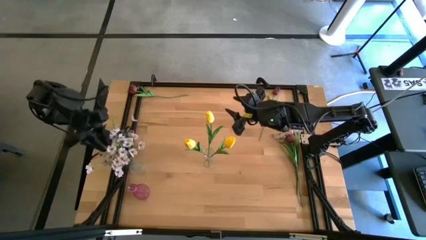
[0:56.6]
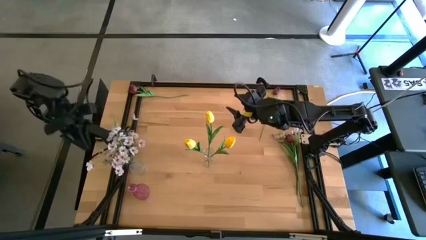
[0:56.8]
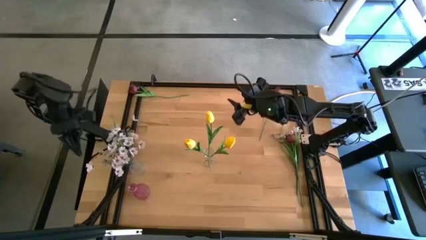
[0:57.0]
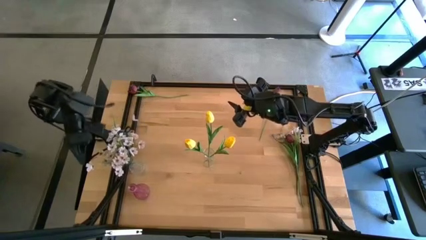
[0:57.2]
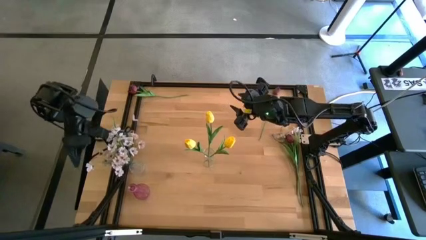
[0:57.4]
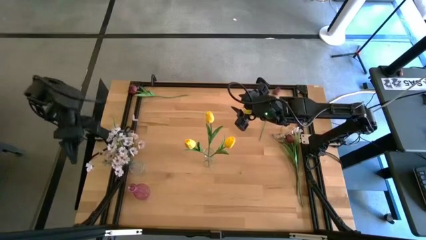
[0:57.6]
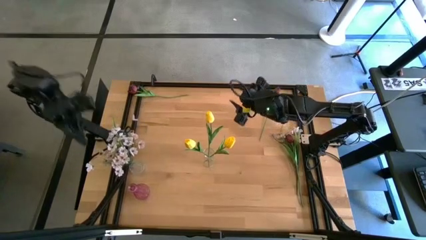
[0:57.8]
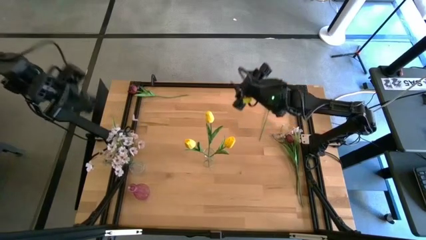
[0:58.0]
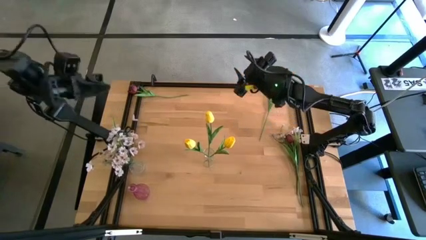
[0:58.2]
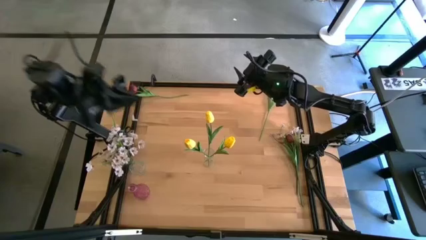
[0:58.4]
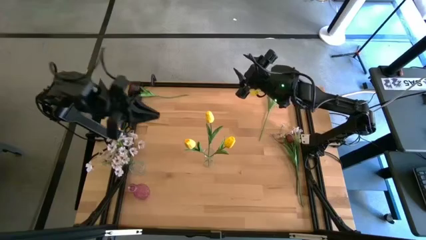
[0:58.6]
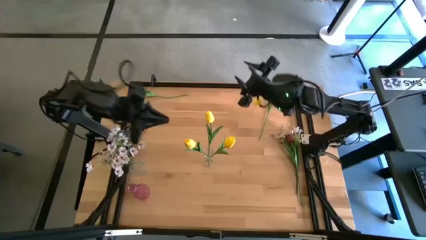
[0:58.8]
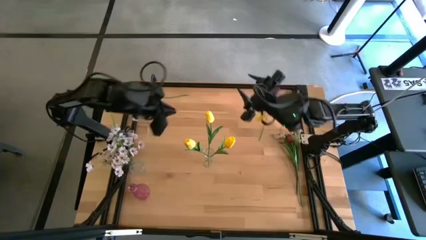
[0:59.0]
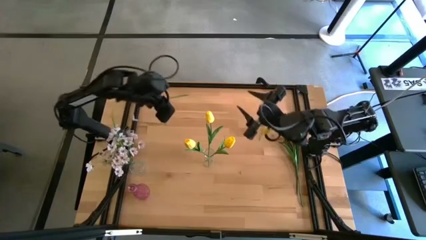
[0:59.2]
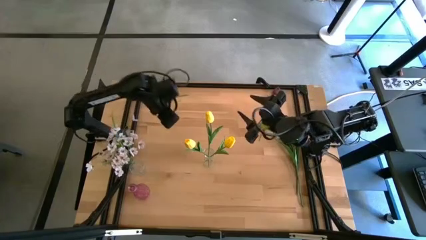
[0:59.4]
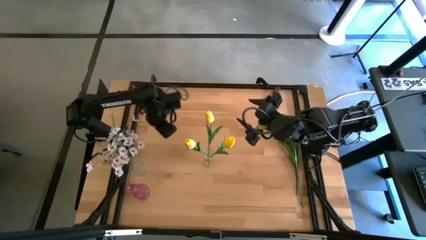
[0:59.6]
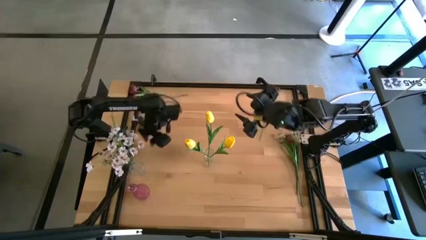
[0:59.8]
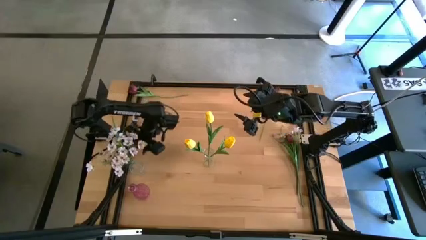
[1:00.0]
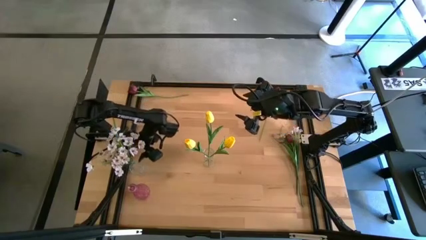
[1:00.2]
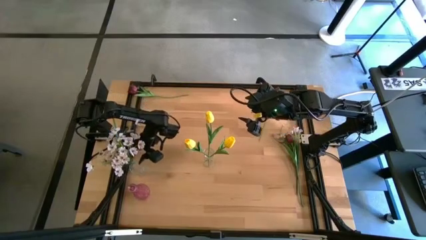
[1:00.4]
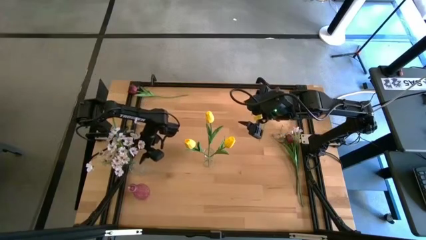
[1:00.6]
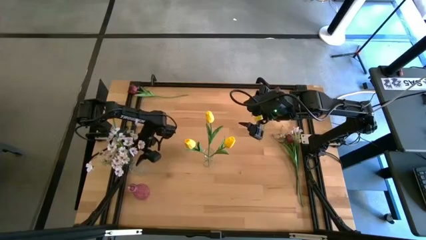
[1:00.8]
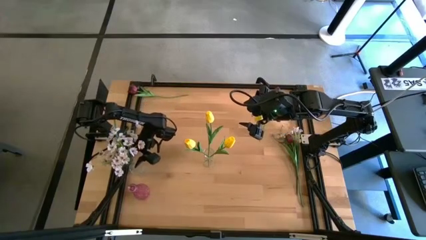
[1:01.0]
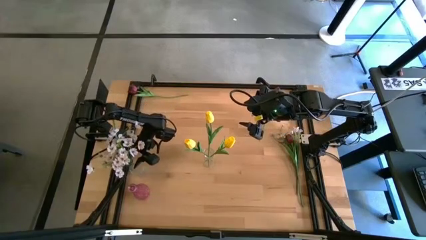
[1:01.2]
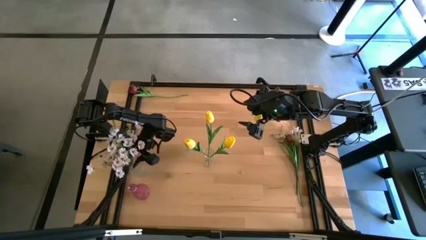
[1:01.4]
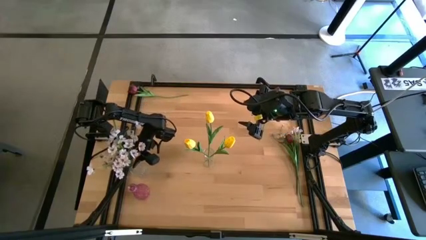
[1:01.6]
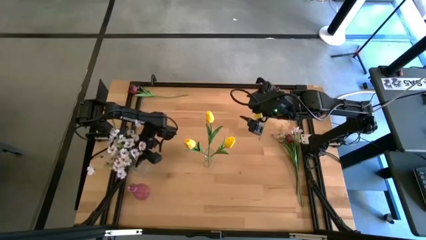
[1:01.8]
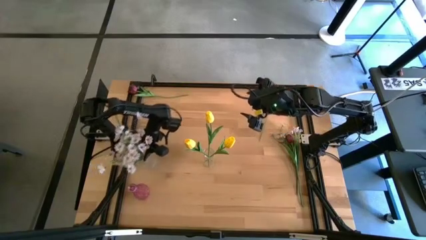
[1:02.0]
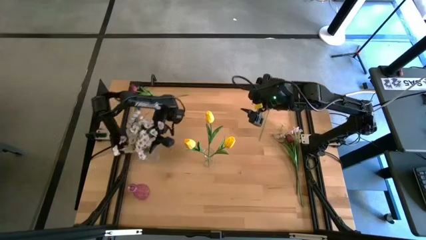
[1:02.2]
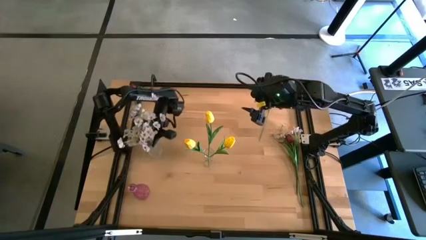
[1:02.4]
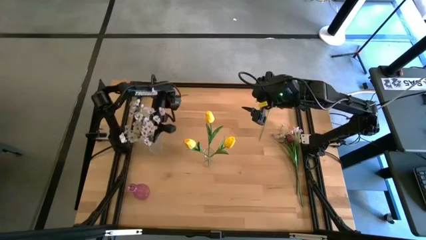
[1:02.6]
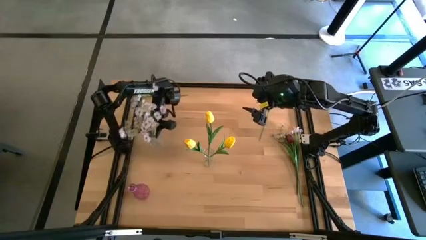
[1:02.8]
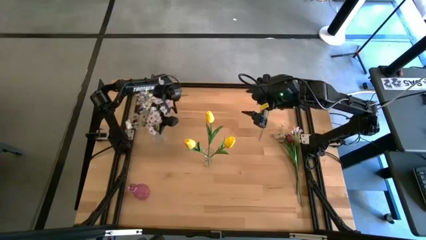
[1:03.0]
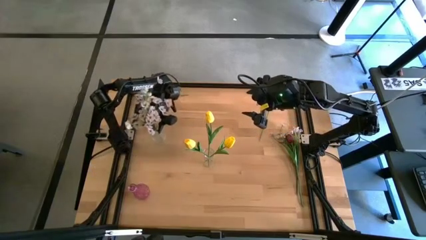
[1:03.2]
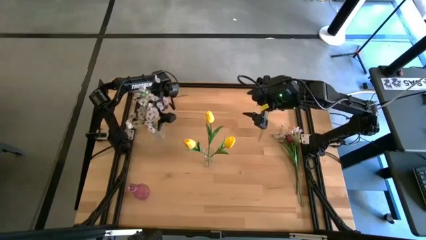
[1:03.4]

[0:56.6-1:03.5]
Task: Sort flowers into vase by color
Move the left transparent vase to the top left of the table

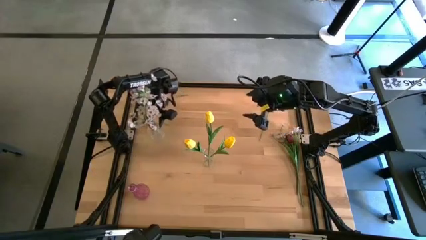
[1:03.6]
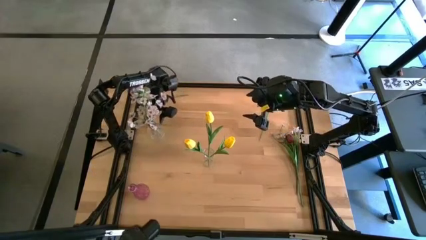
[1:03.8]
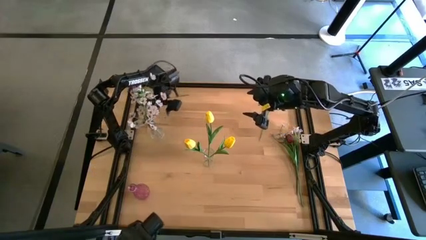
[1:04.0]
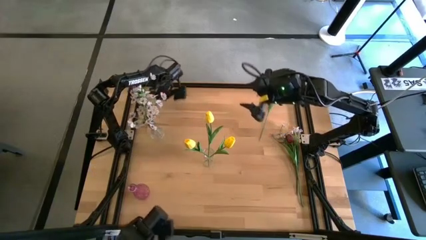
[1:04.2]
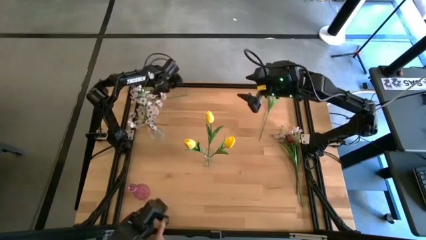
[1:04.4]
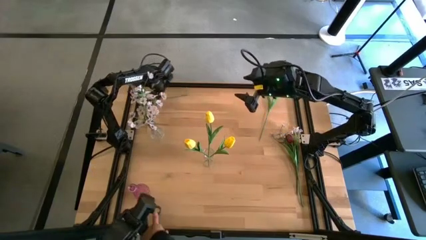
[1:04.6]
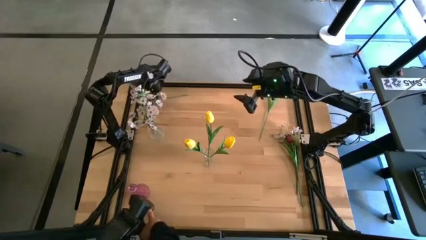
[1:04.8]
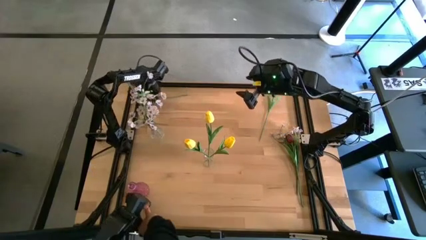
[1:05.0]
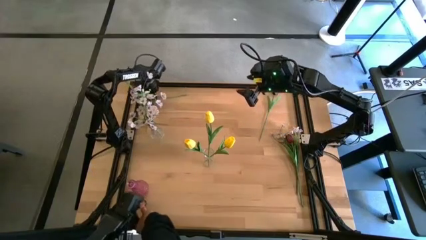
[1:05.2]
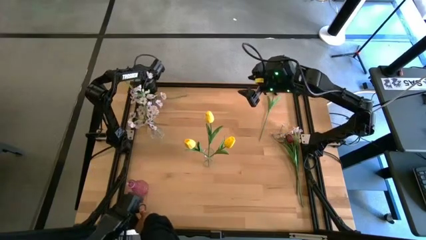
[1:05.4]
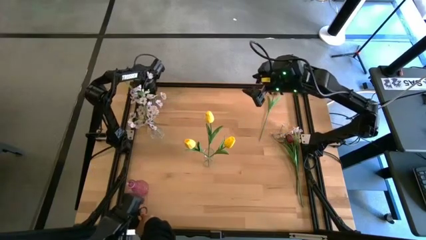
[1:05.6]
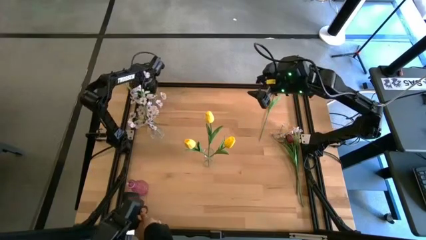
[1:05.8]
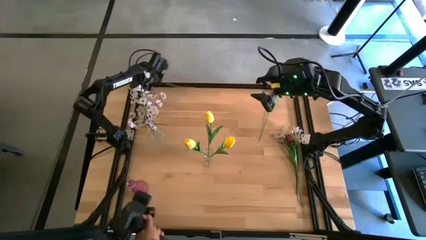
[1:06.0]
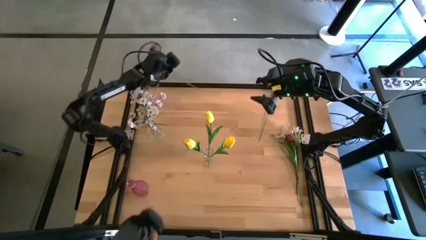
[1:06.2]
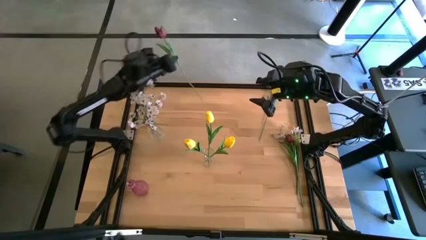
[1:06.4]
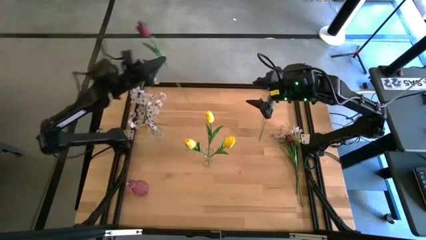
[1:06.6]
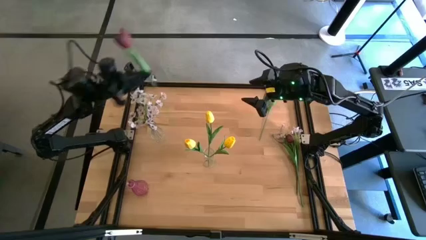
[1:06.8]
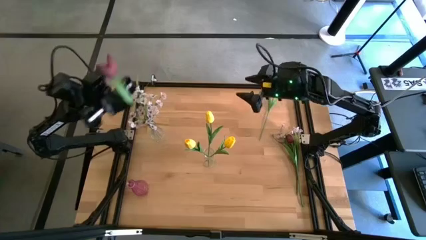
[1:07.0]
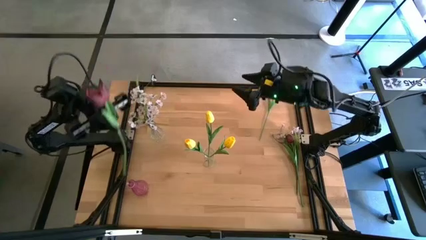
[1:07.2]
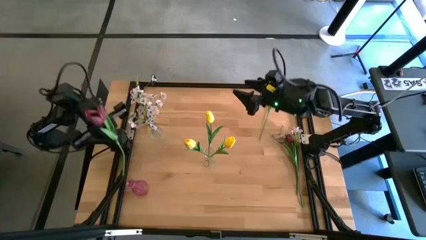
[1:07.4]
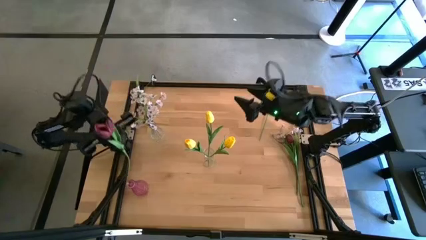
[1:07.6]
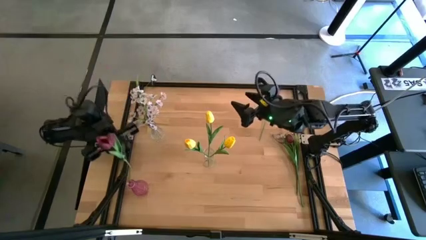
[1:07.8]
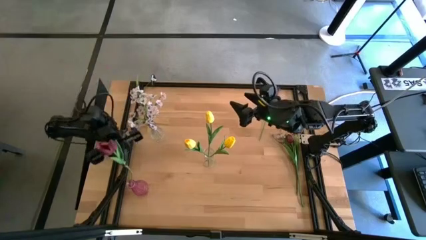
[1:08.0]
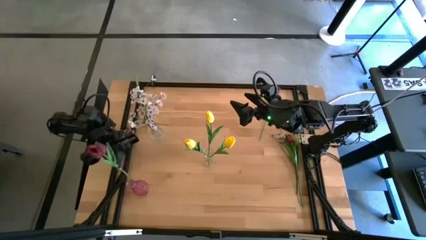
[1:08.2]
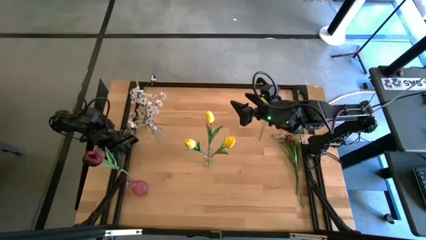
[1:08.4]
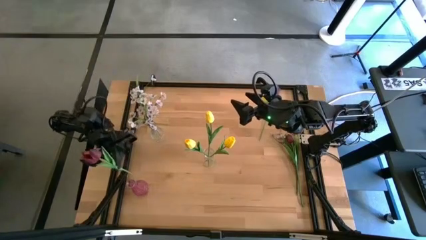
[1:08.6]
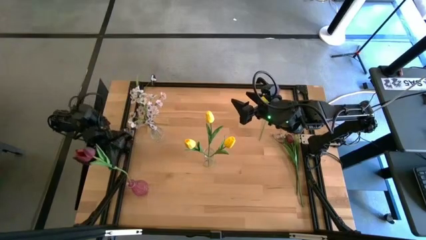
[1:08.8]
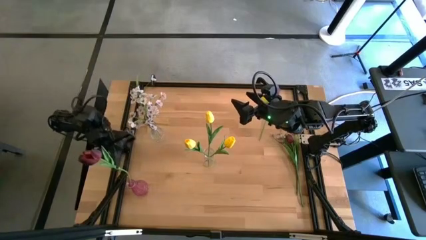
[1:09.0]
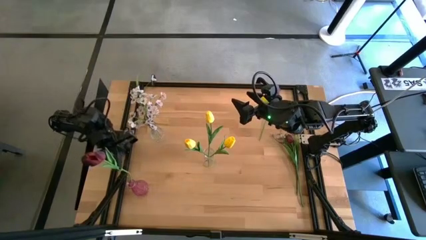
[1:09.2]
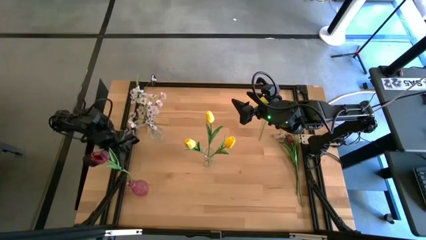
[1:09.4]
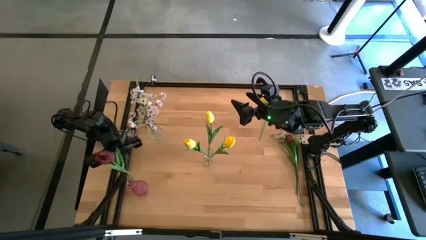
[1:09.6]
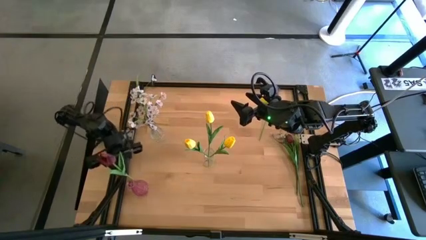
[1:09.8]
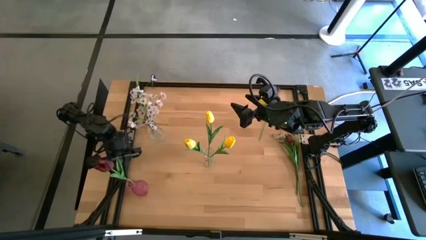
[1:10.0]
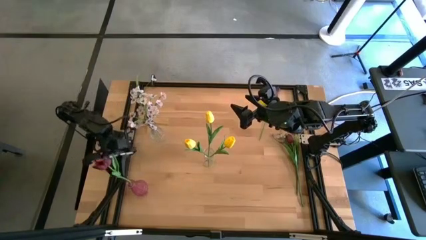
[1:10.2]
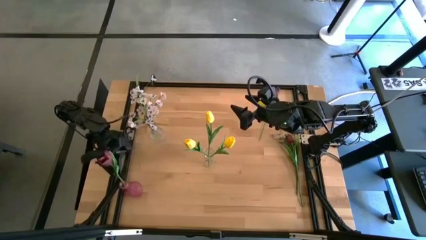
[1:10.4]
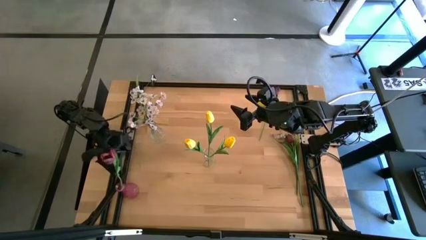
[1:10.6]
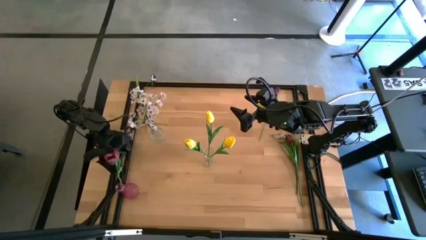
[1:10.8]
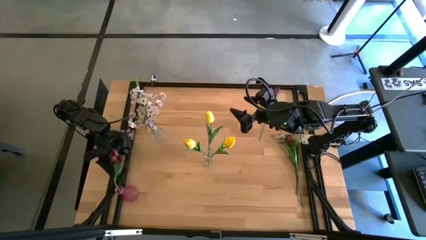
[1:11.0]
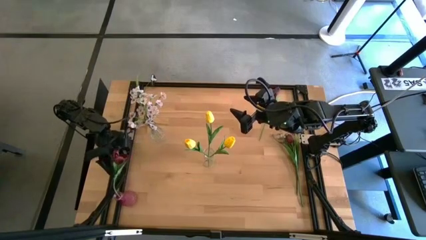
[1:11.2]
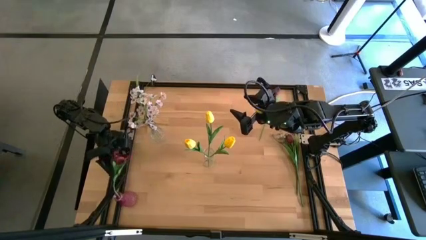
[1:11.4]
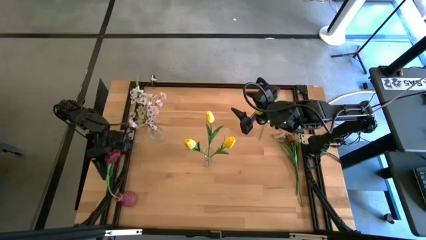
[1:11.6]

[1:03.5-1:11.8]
Put the top right dark red flower into the purple vase
